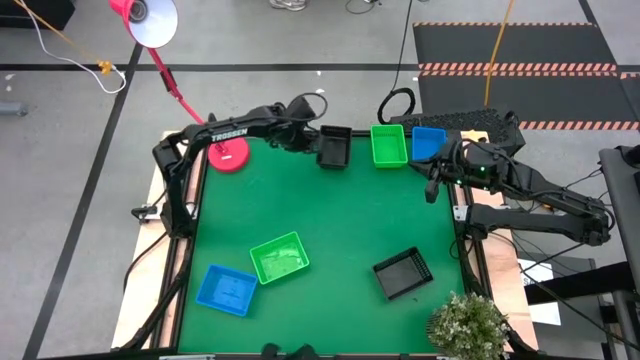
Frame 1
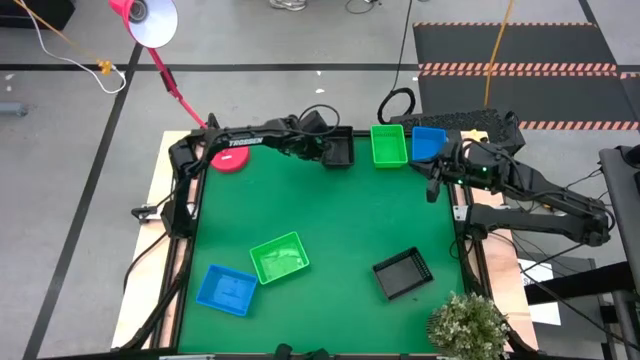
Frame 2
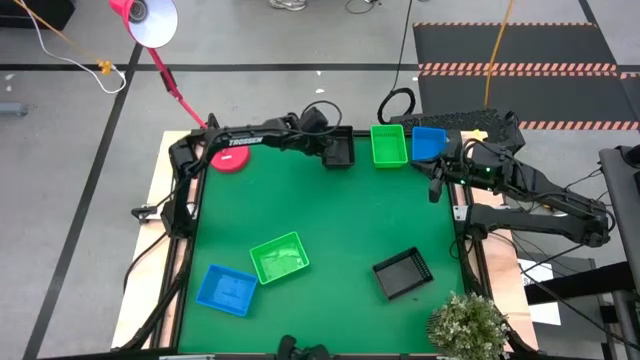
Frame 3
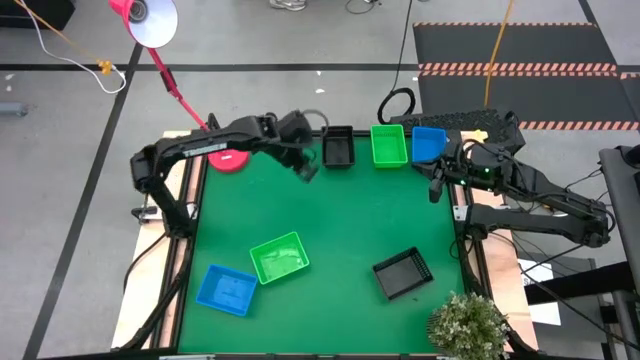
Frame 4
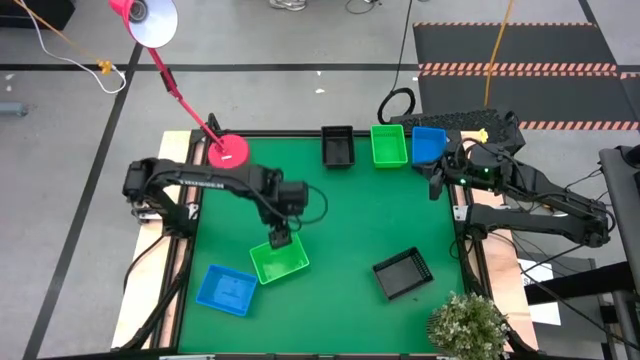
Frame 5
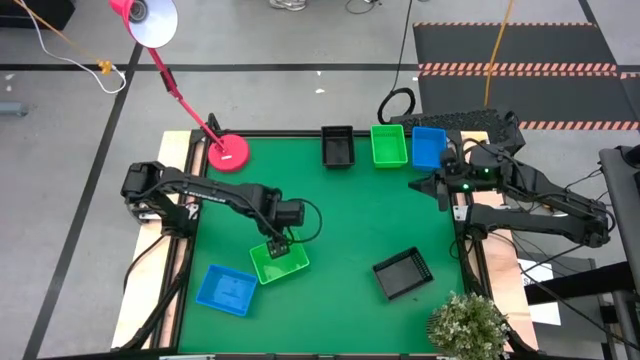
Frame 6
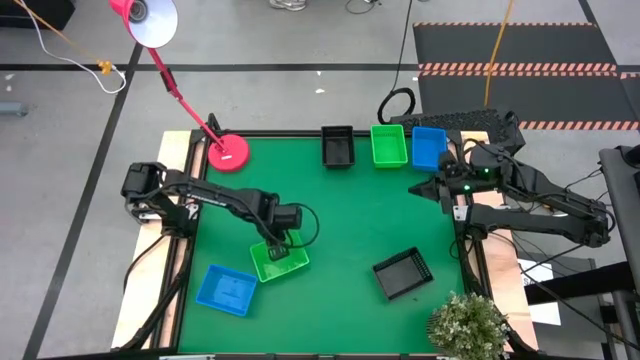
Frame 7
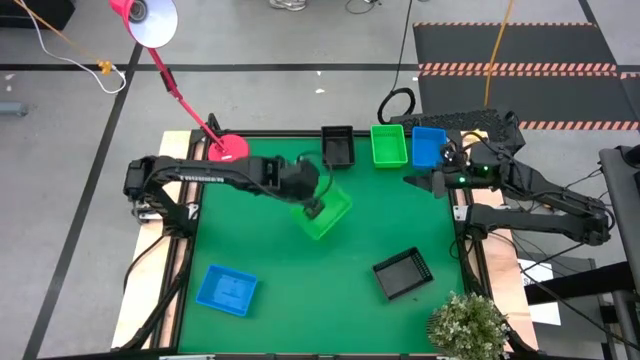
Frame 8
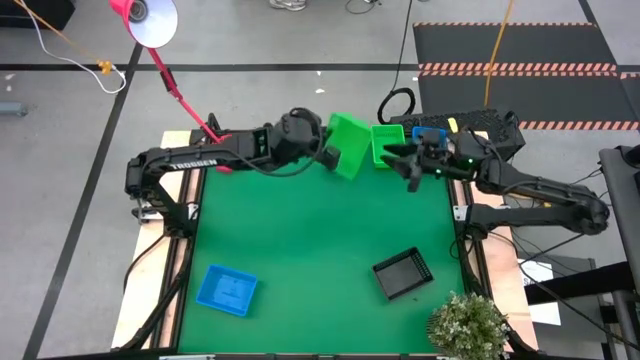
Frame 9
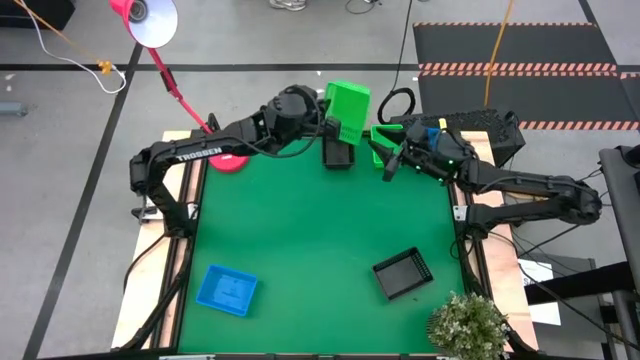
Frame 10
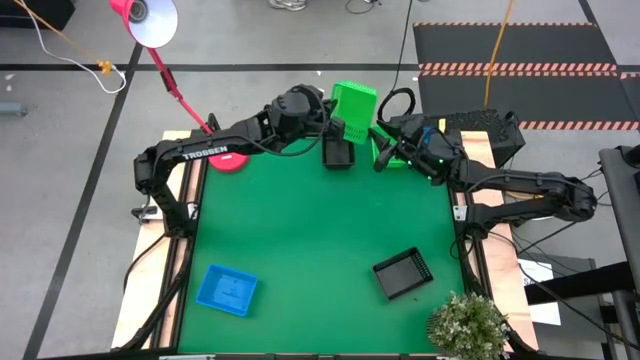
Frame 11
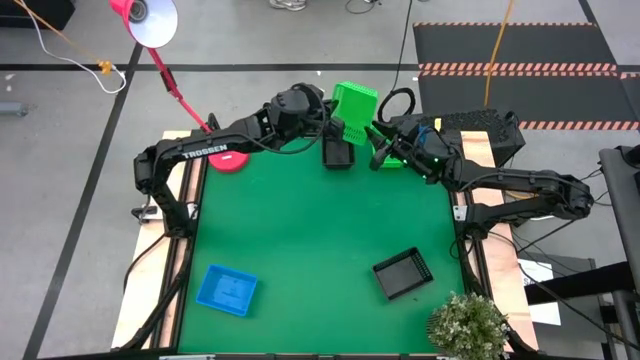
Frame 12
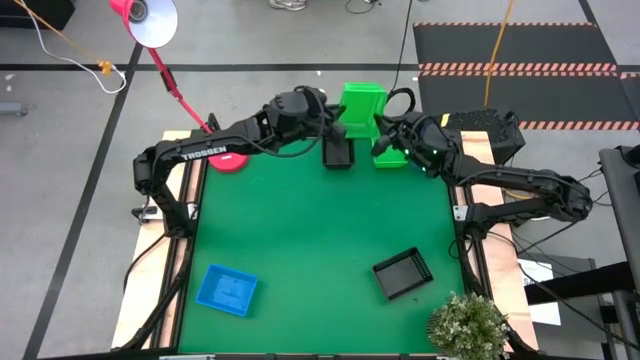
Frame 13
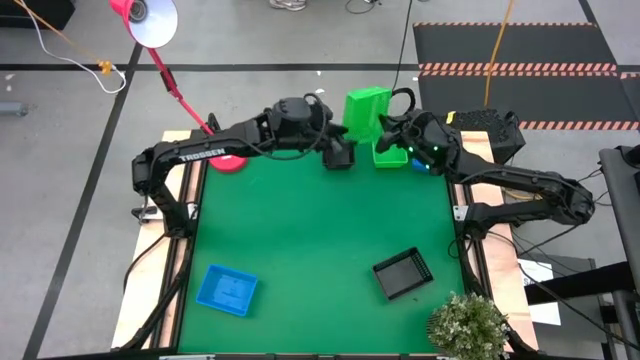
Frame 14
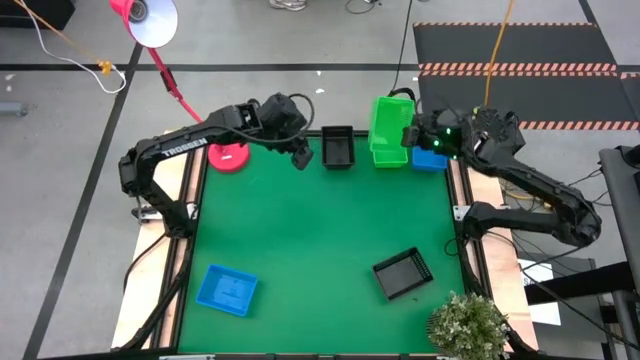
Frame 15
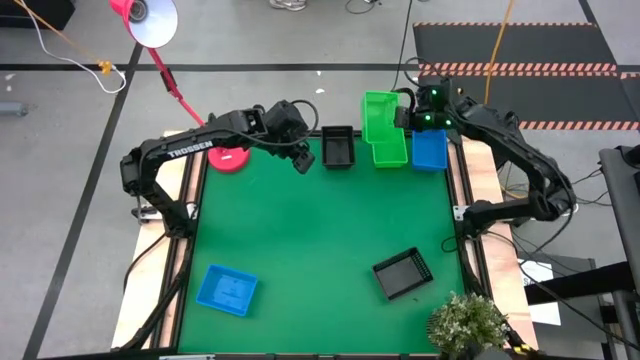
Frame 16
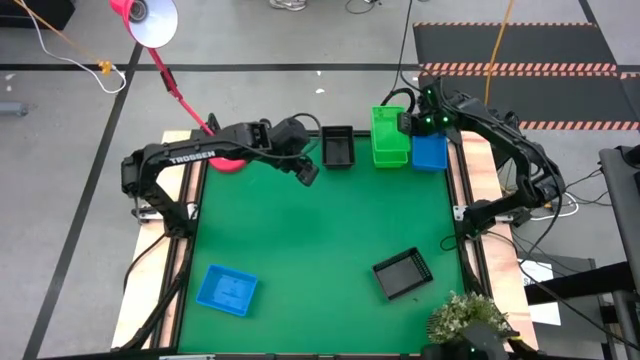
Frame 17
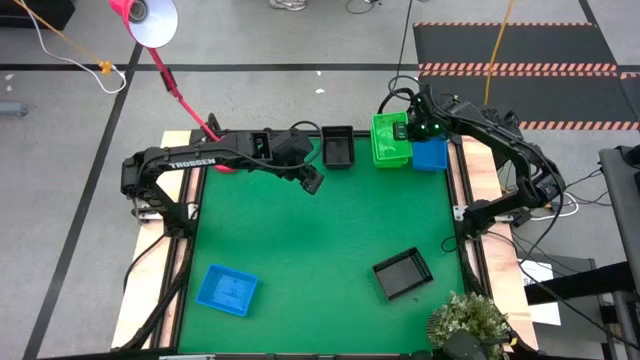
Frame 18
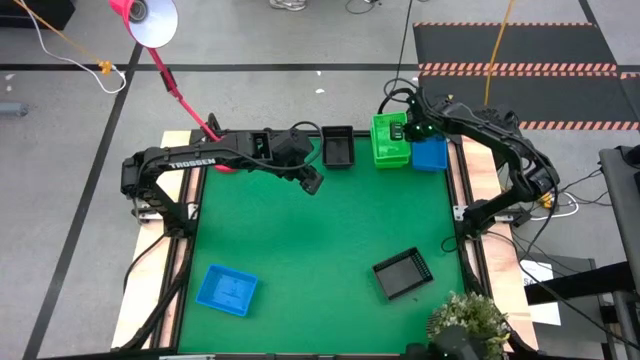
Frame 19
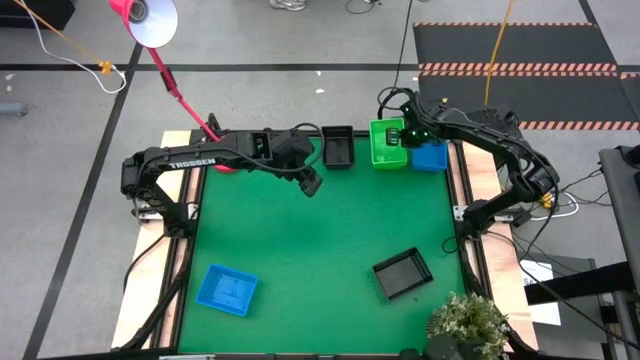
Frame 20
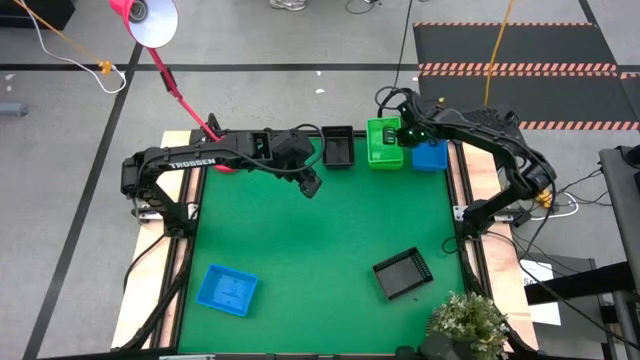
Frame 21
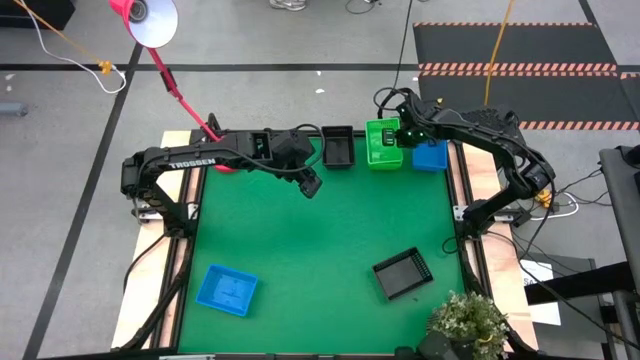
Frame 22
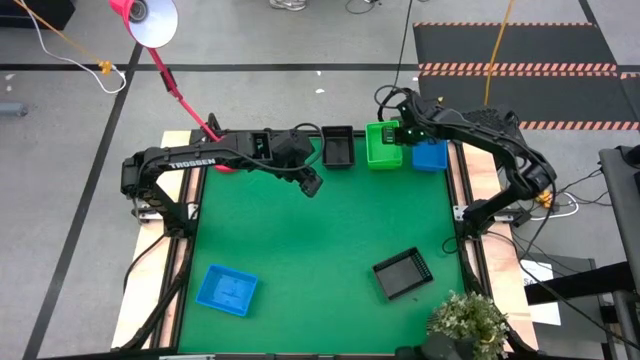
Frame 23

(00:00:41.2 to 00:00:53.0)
Stack the green bin on the stacked green bin

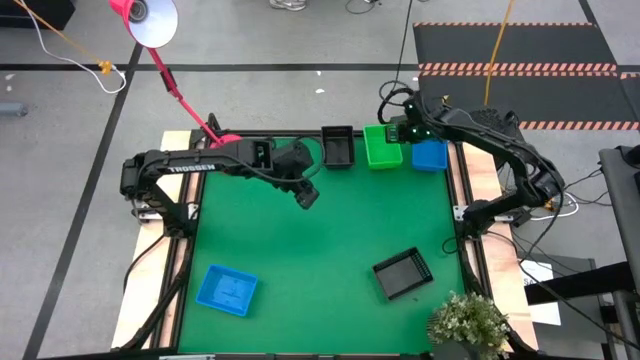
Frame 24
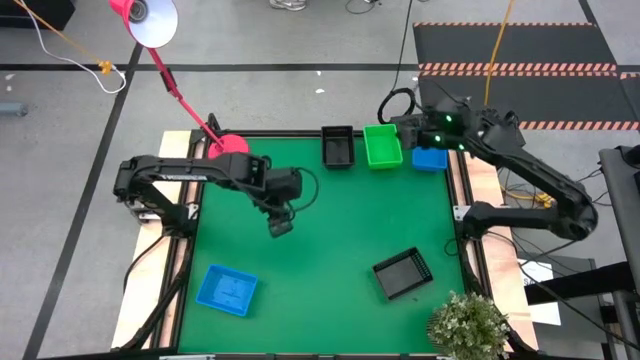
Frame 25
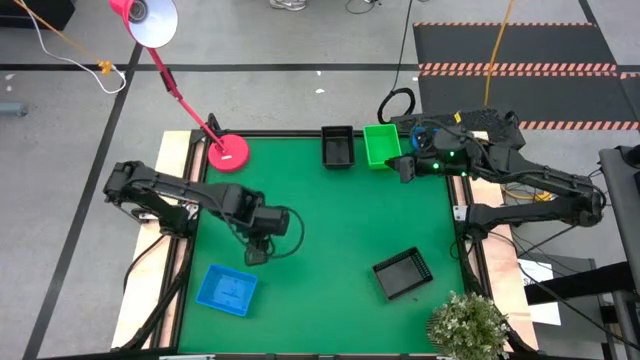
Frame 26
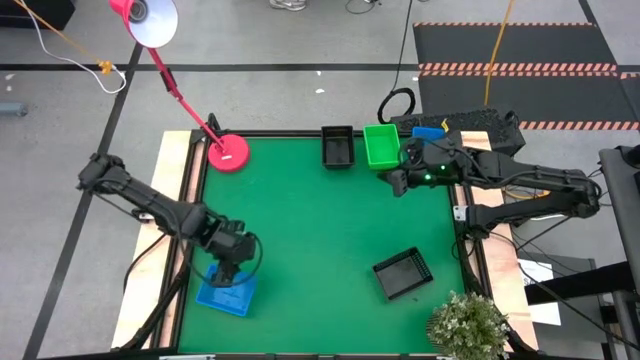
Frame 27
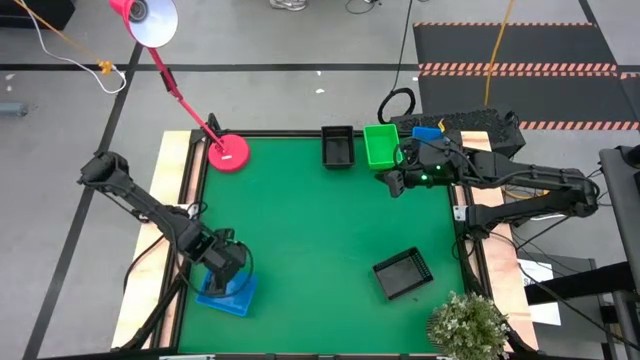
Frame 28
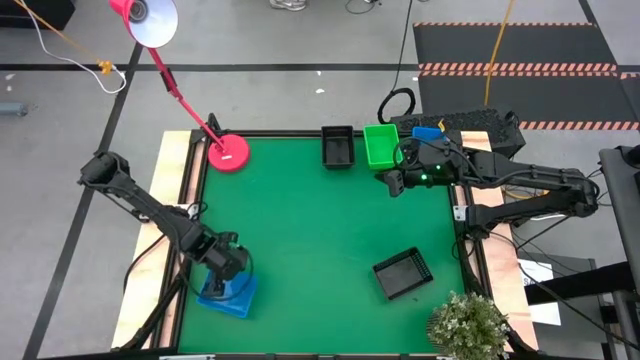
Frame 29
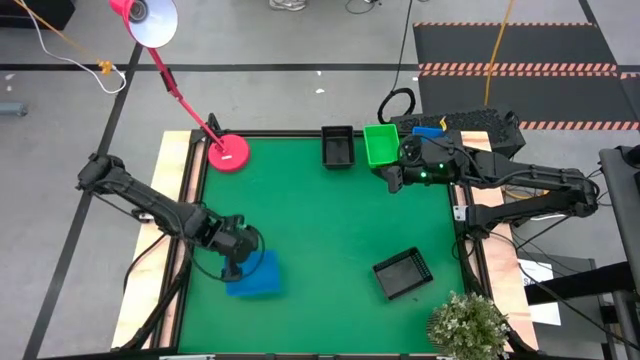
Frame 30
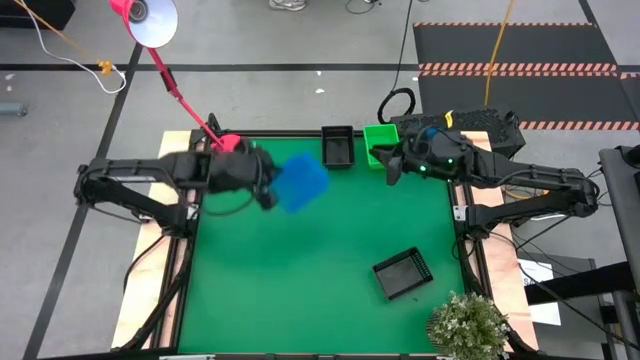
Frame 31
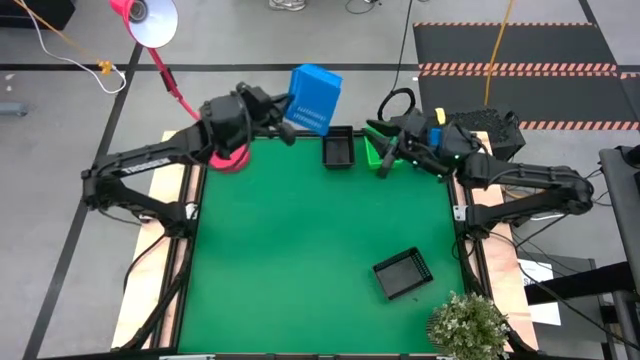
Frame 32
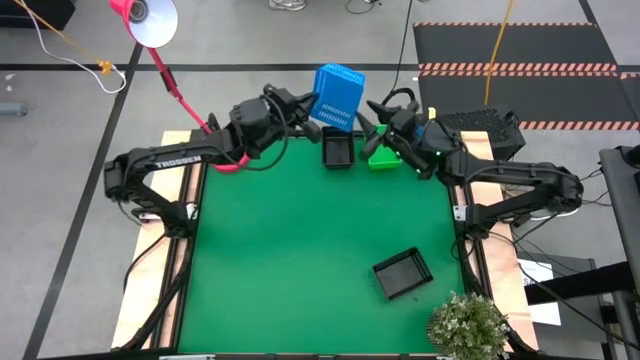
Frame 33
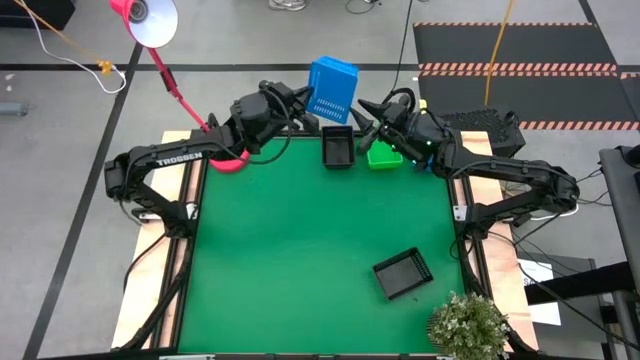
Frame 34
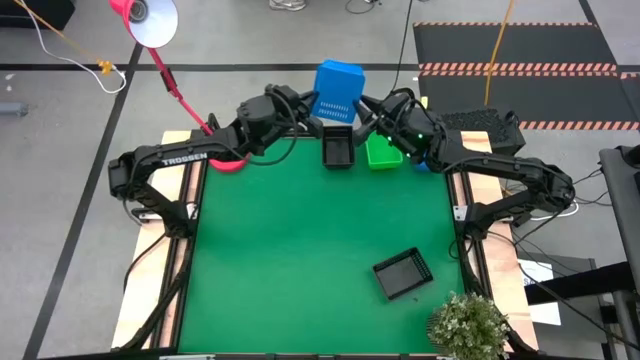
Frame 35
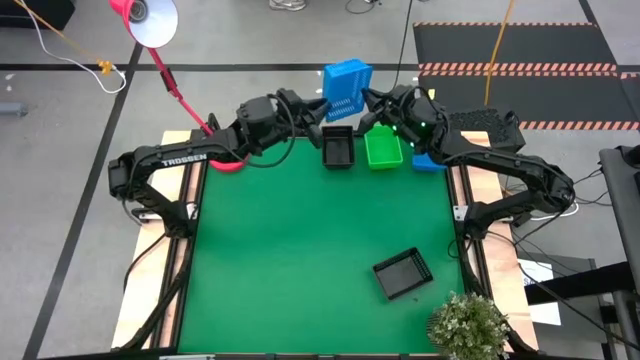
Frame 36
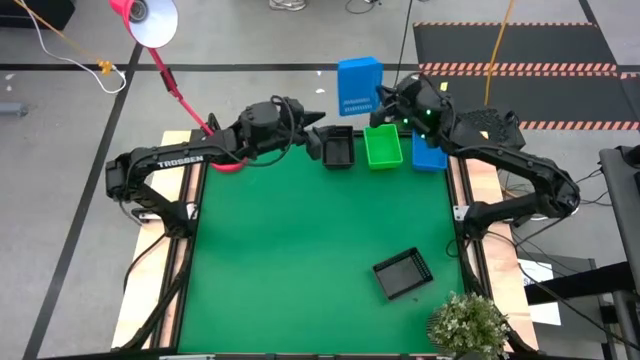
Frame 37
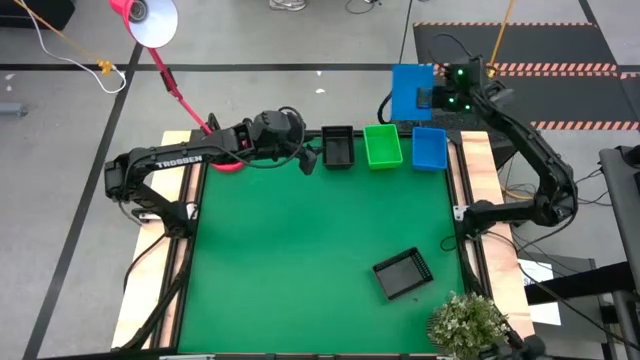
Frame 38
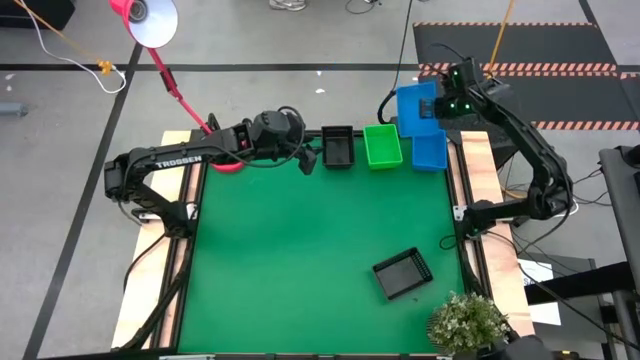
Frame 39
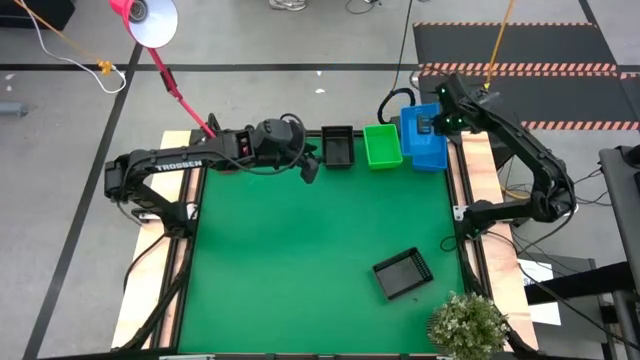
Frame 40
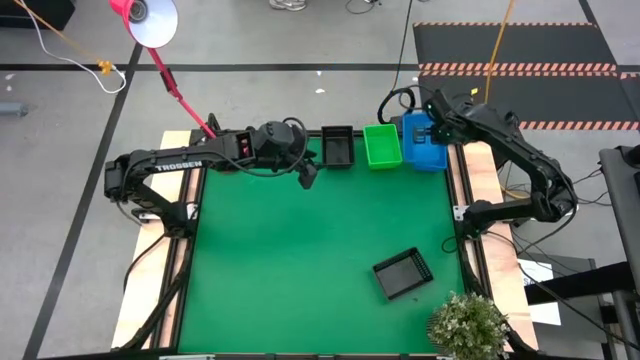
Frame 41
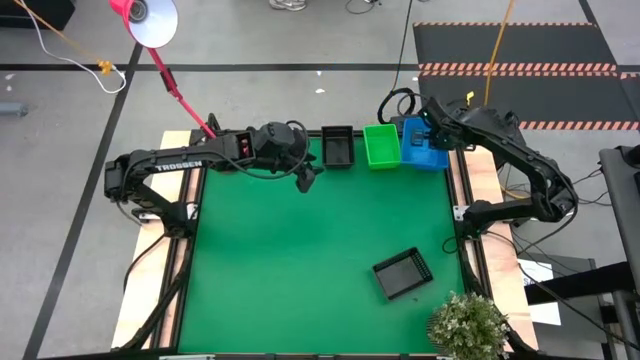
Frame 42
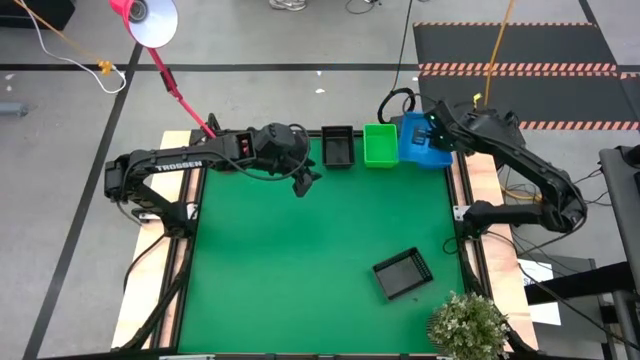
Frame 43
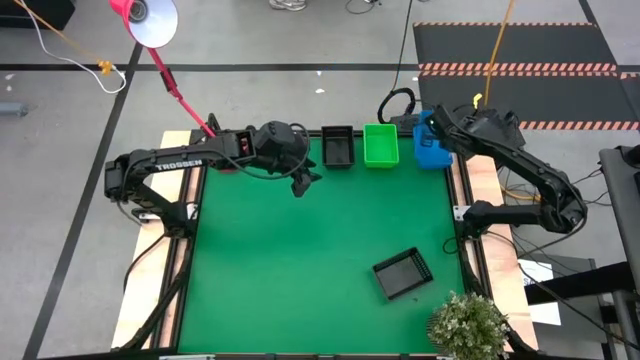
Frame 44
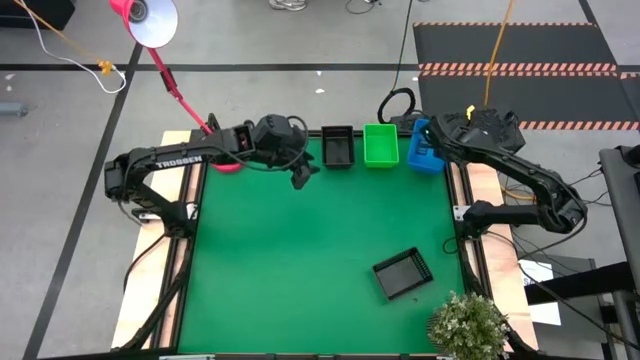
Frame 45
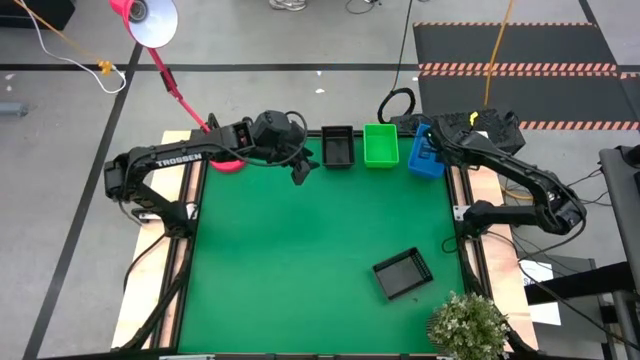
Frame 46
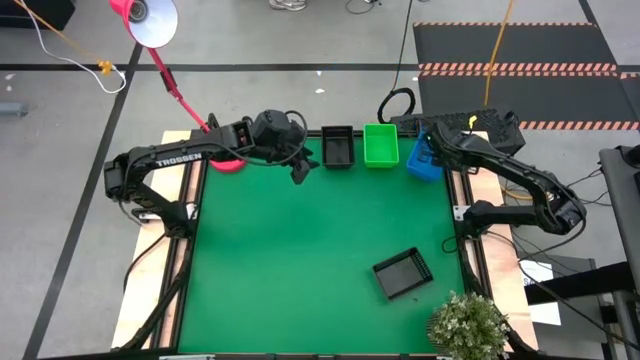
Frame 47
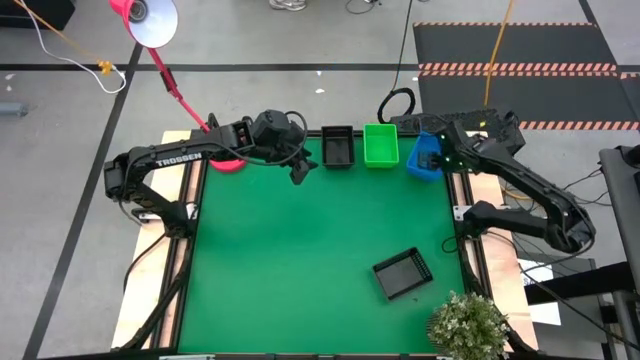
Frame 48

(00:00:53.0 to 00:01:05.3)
Stack the blue bin on the stacked blue bin
